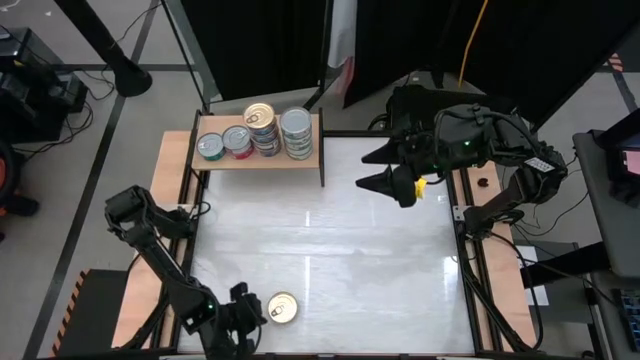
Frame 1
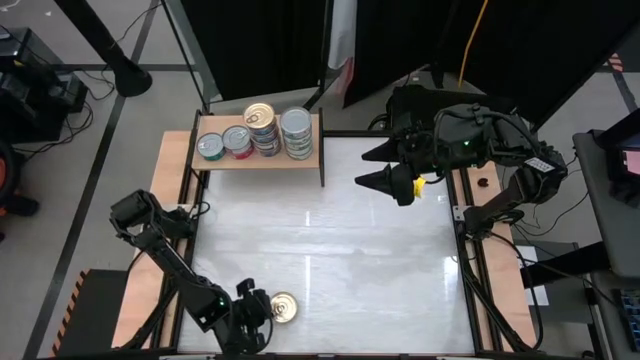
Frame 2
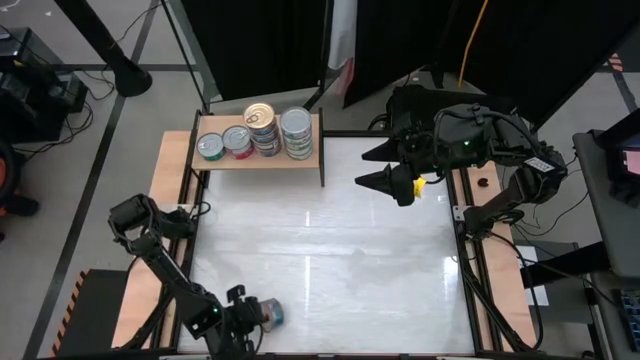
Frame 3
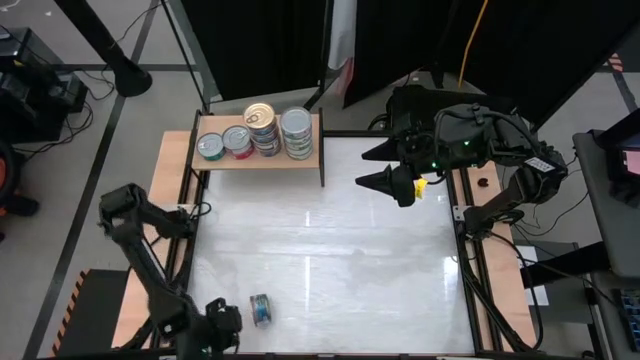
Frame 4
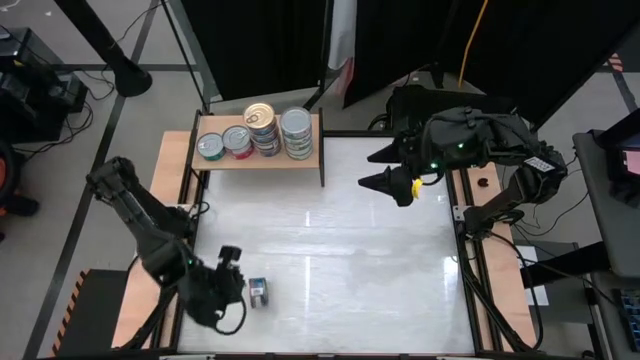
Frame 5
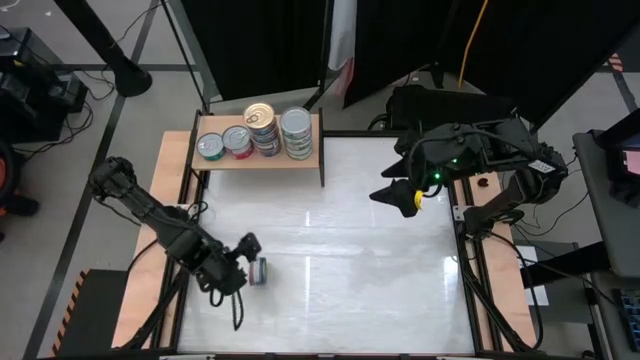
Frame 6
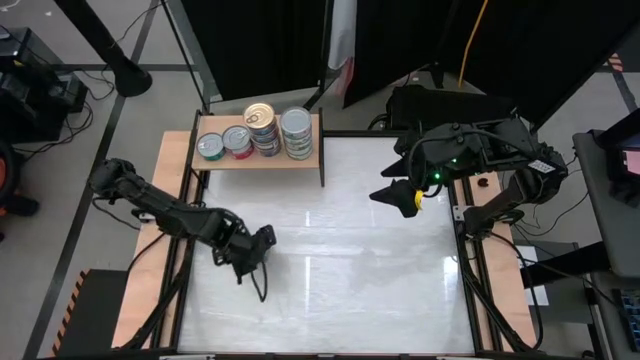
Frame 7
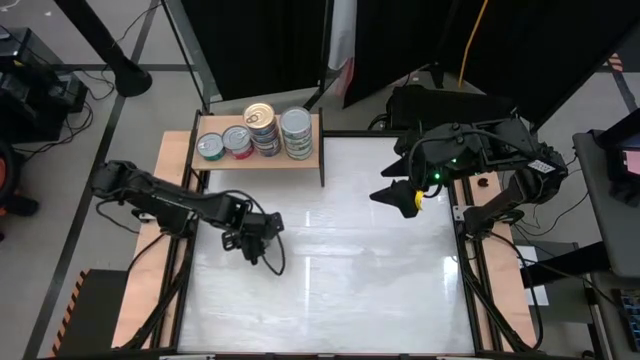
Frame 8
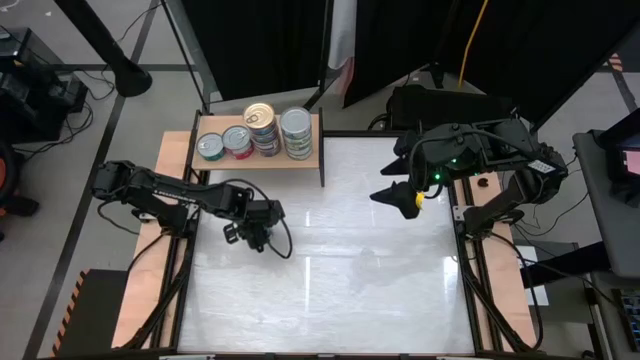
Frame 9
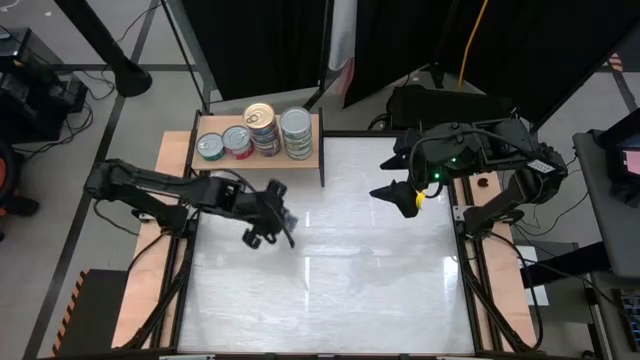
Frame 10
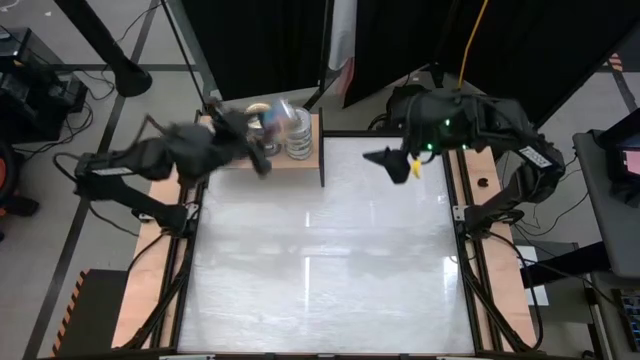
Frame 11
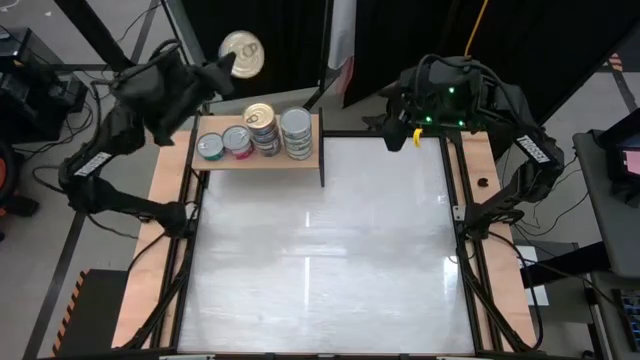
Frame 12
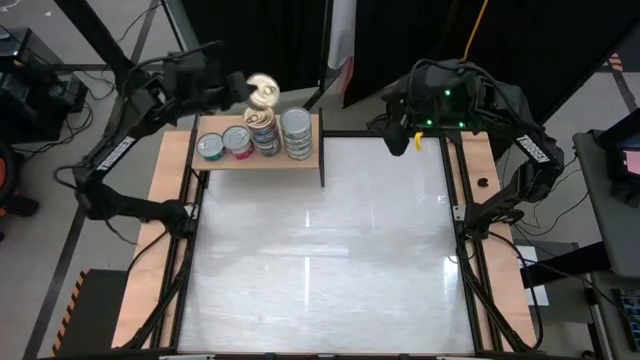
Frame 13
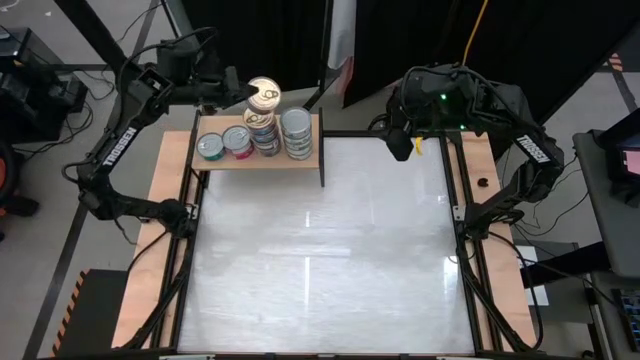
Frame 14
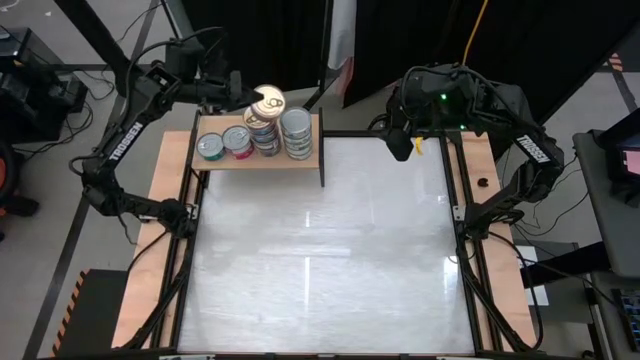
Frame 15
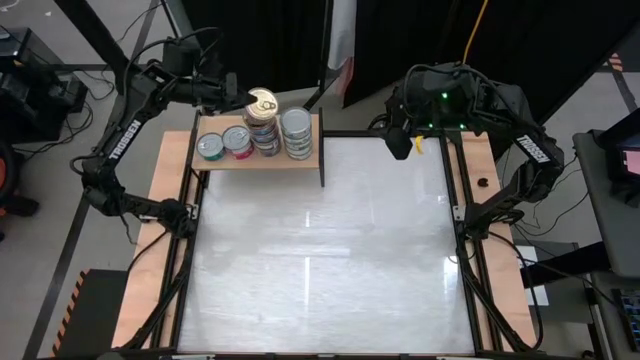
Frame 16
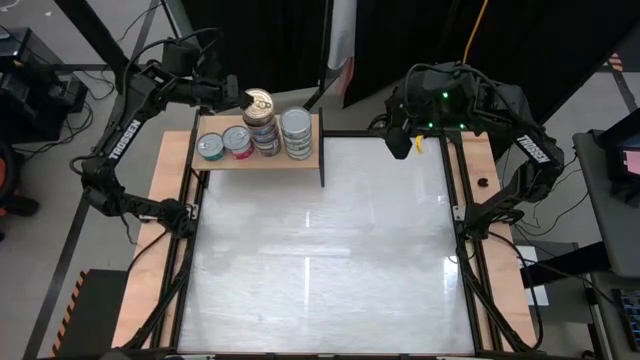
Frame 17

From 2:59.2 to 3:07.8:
Task: Stack canned seafood by type on shelf
Stack the blue pink tuna can on top of the blue pink tuna cans on the shelf

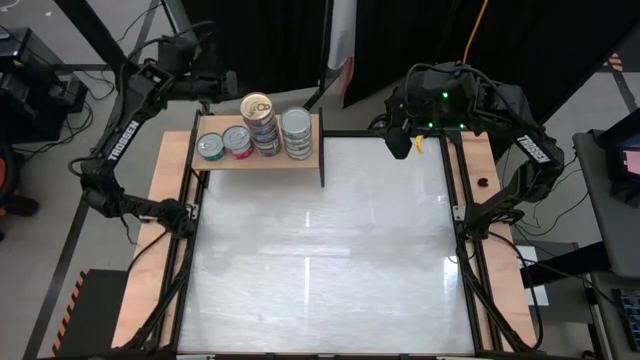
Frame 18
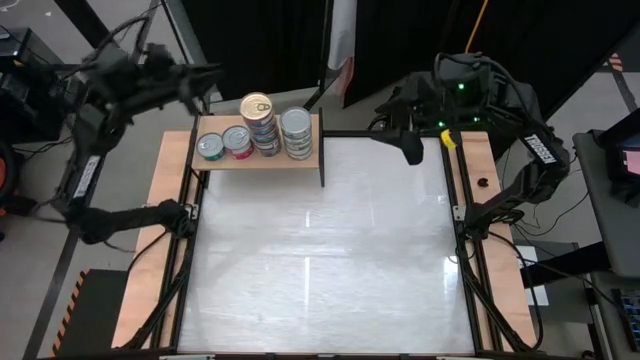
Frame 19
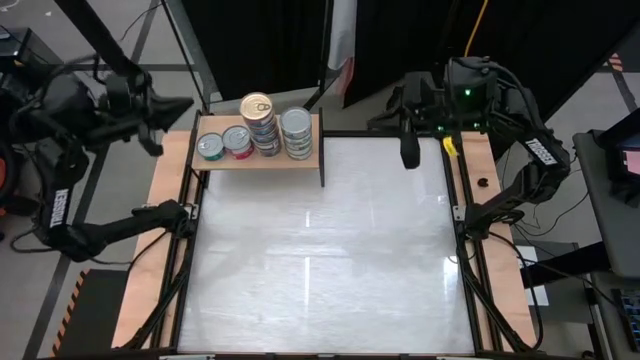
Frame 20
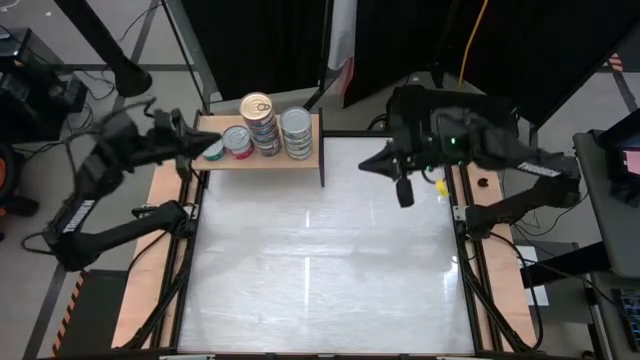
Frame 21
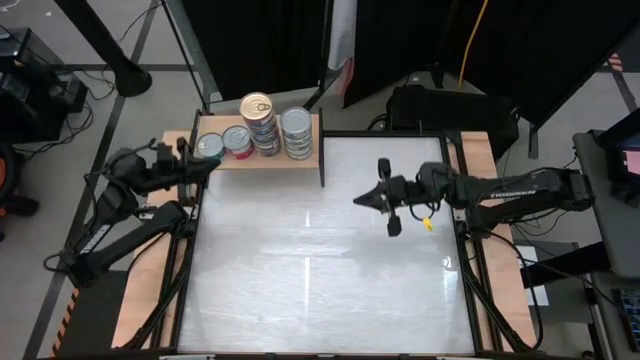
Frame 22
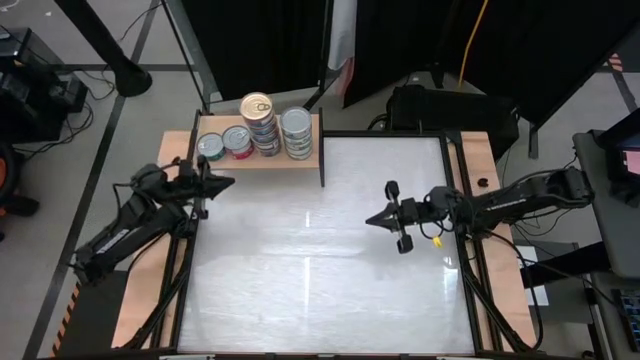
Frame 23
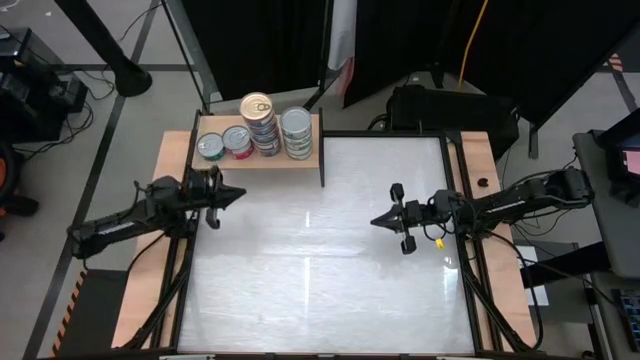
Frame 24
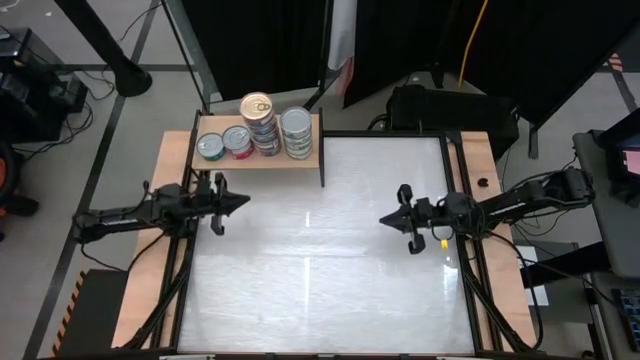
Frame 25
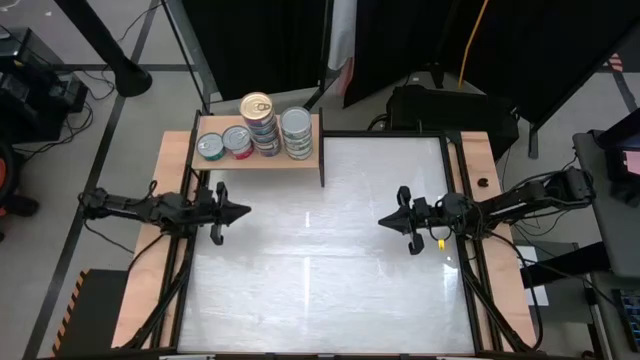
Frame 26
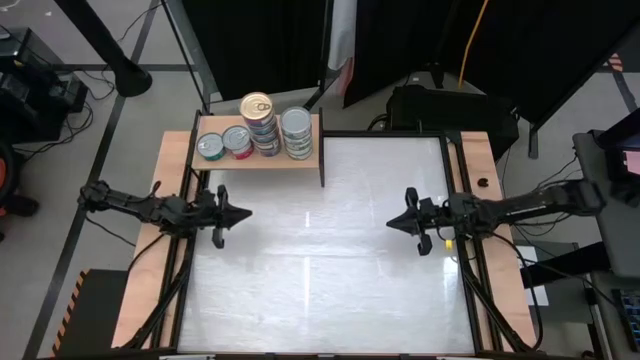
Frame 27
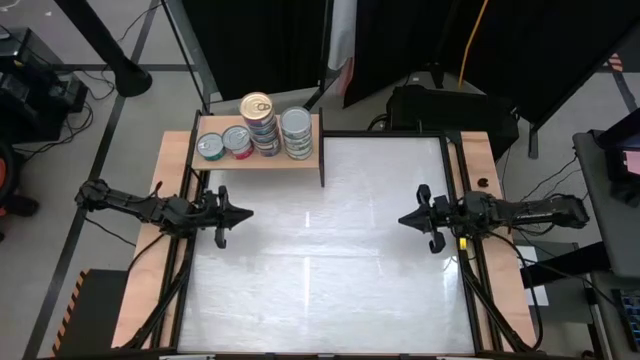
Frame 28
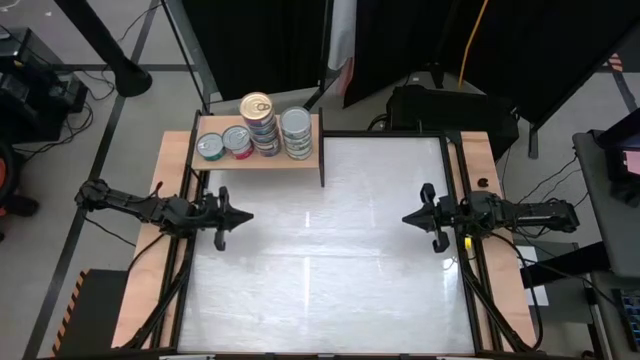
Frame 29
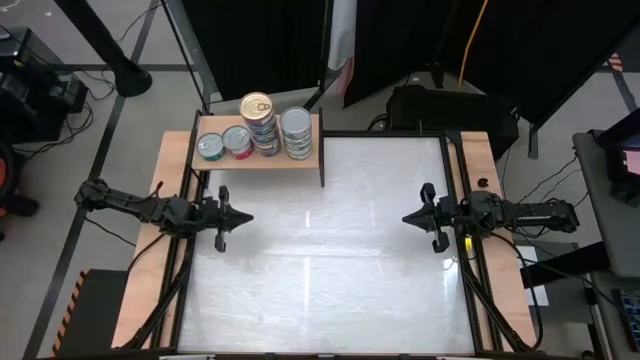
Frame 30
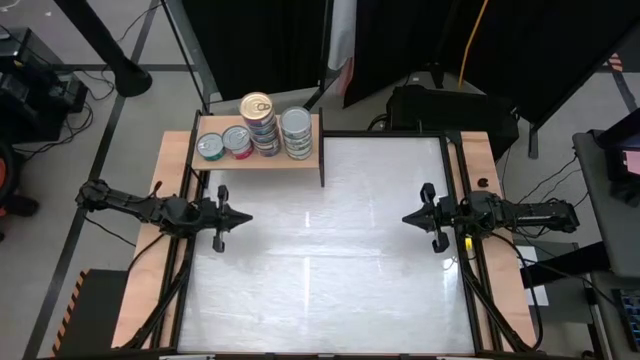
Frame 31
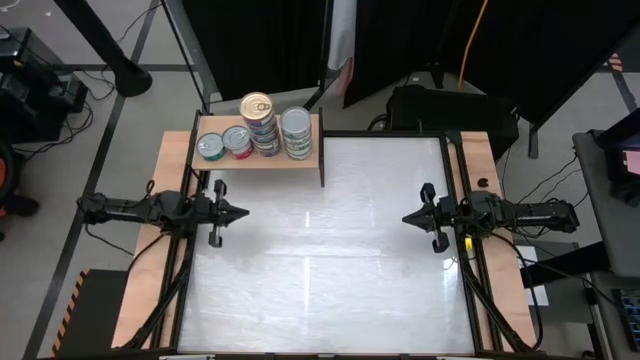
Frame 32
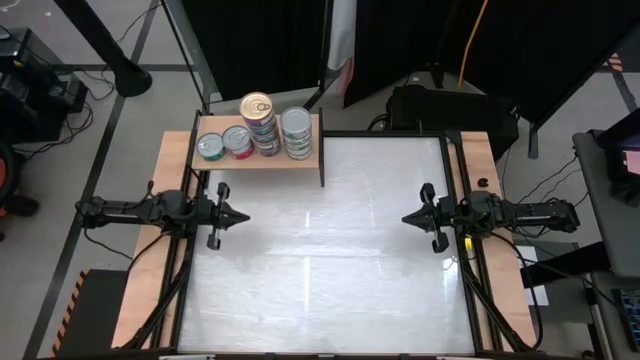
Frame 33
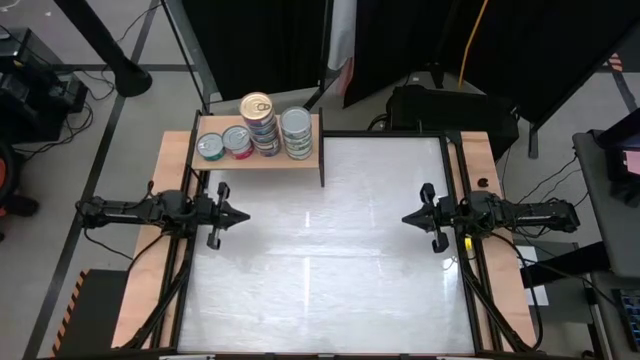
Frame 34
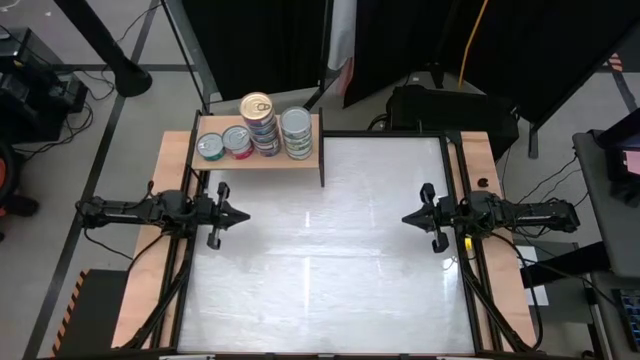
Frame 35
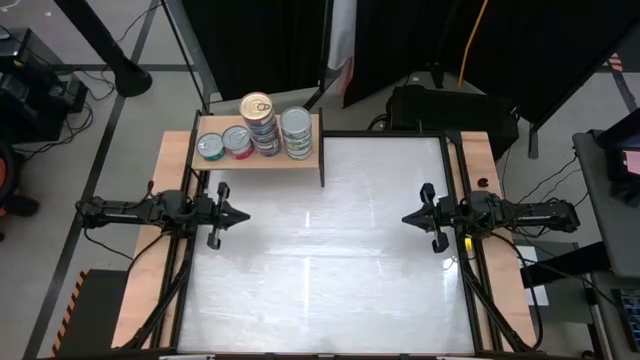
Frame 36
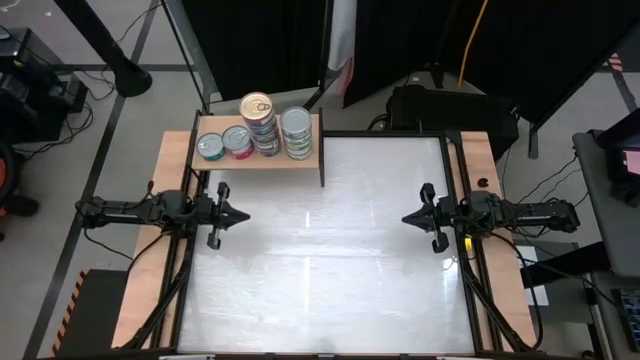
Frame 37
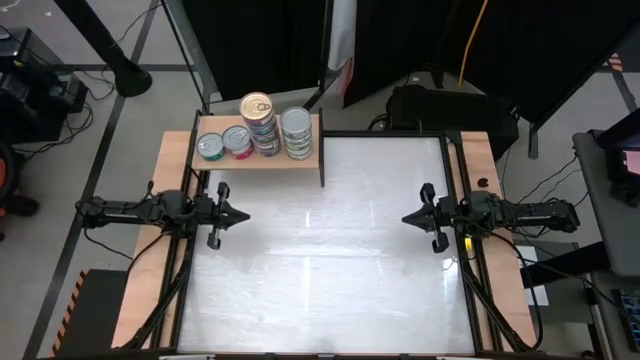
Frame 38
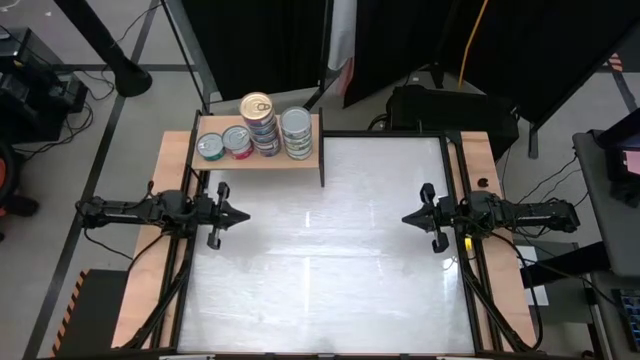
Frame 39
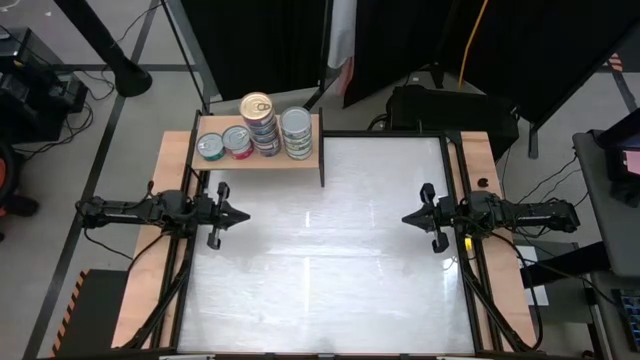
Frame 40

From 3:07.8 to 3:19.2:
Return to Home Position

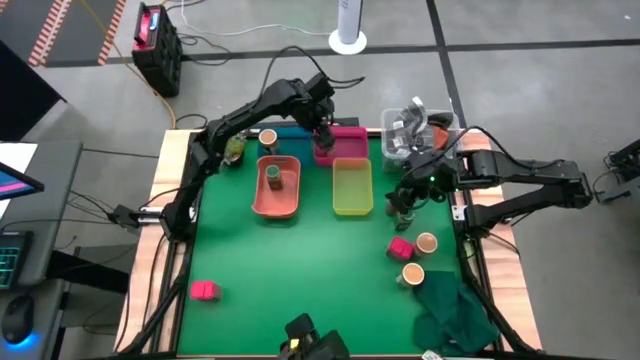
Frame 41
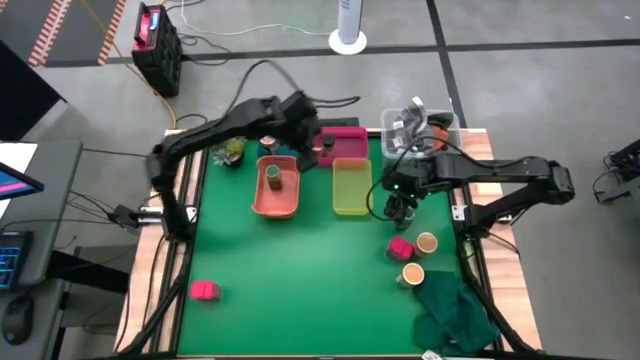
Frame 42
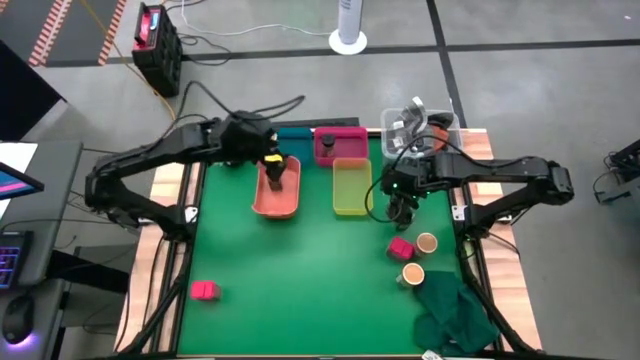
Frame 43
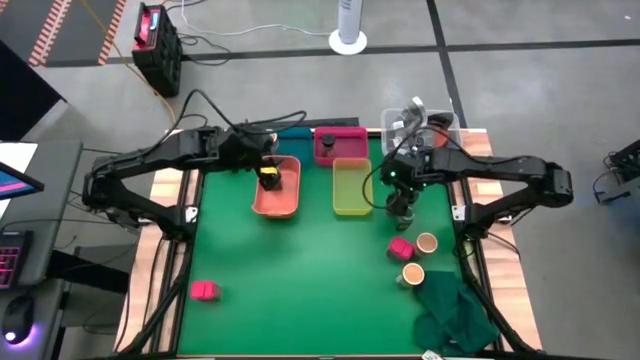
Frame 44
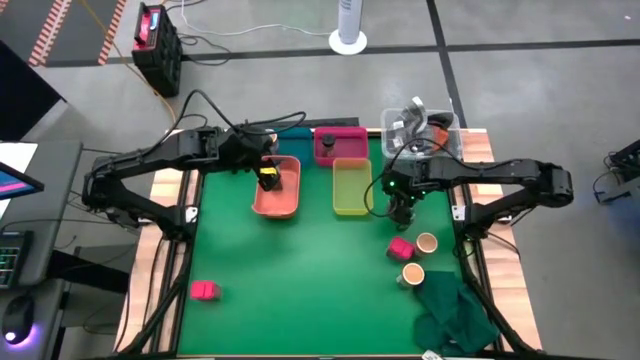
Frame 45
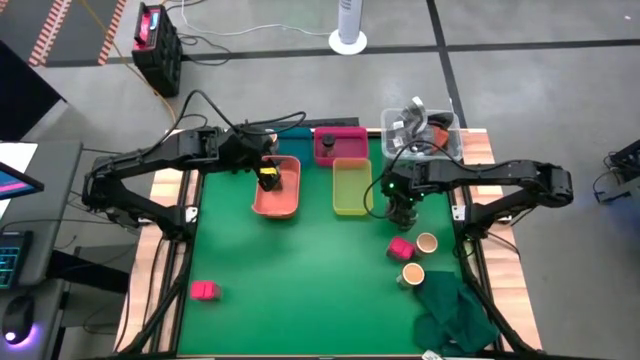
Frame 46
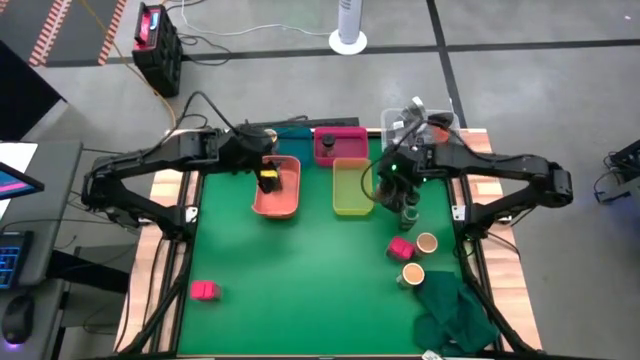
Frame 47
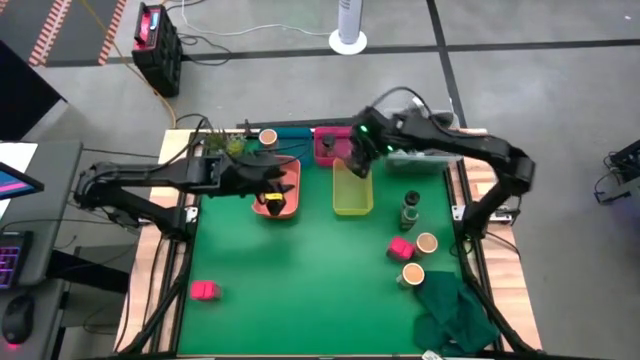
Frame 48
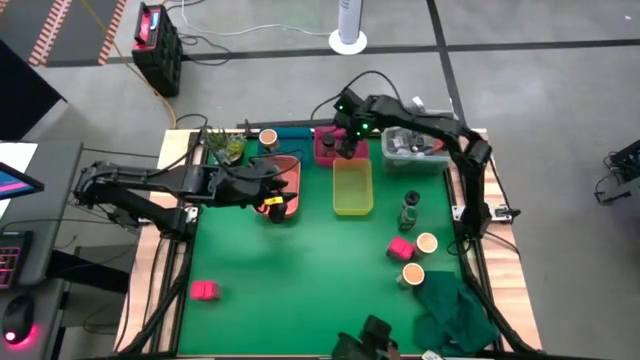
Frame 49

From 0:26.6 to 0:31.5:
Task: Sort spices by type
Put the right black seasoning bottle into the red bin aligned with the other black seasoning bottle
